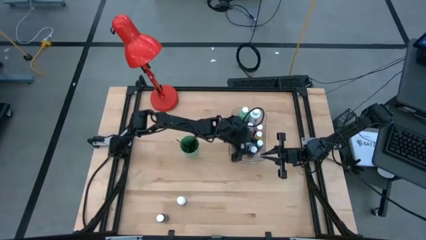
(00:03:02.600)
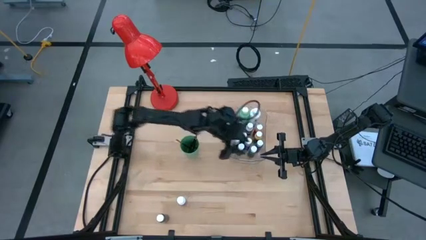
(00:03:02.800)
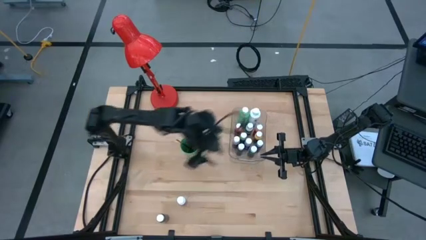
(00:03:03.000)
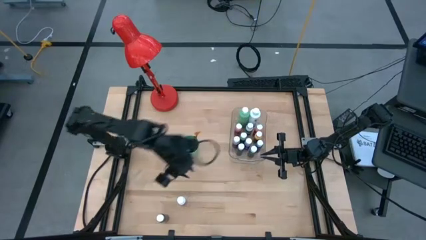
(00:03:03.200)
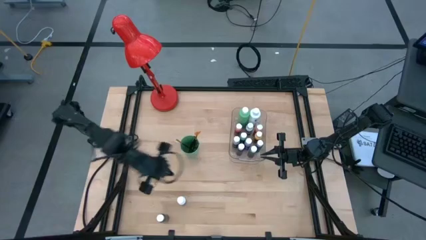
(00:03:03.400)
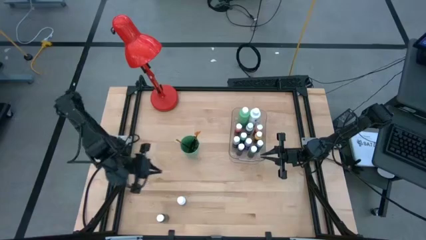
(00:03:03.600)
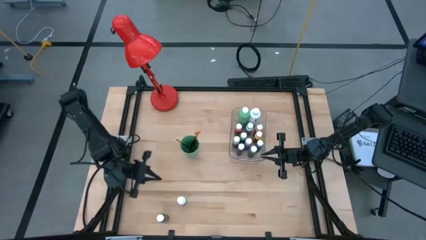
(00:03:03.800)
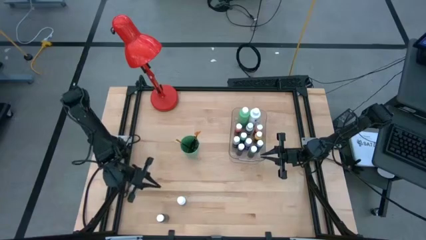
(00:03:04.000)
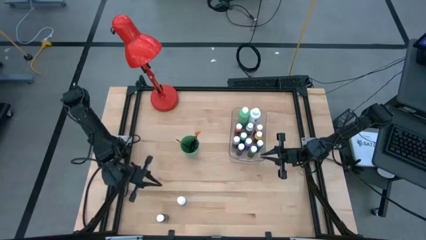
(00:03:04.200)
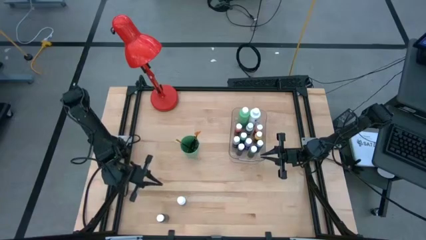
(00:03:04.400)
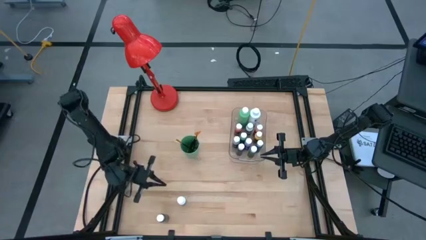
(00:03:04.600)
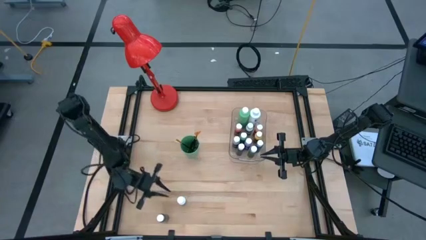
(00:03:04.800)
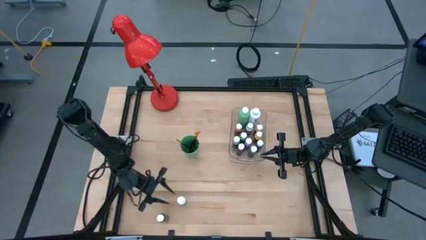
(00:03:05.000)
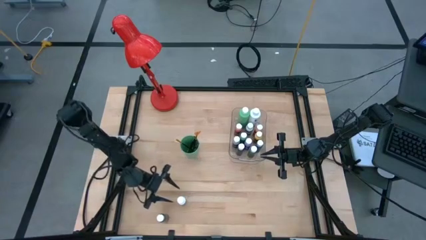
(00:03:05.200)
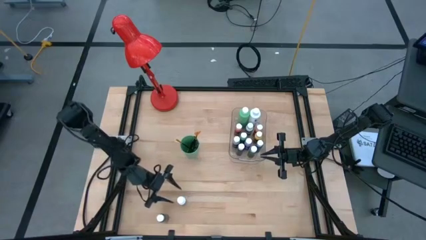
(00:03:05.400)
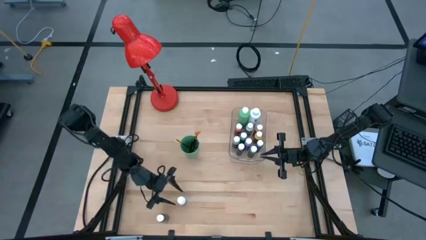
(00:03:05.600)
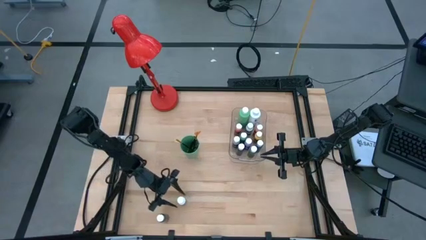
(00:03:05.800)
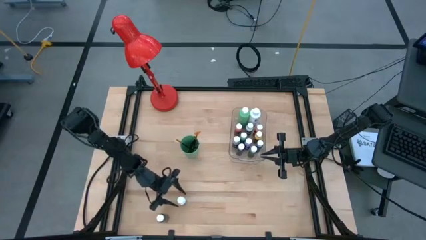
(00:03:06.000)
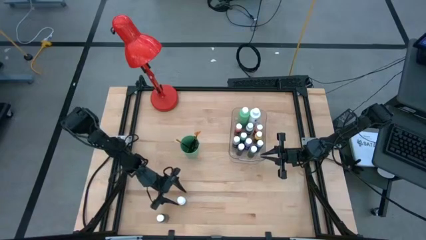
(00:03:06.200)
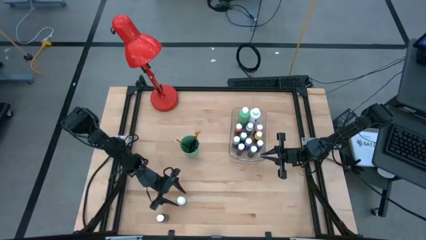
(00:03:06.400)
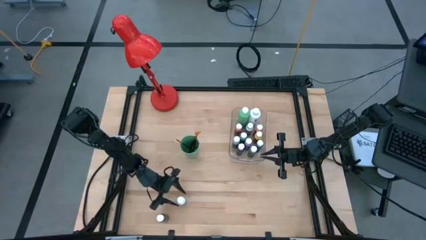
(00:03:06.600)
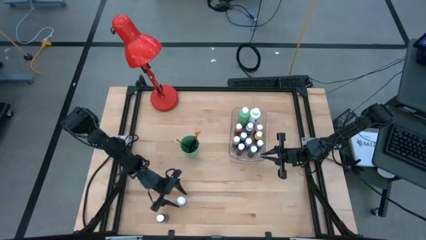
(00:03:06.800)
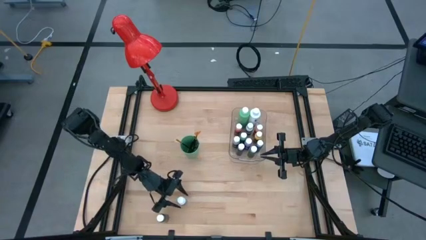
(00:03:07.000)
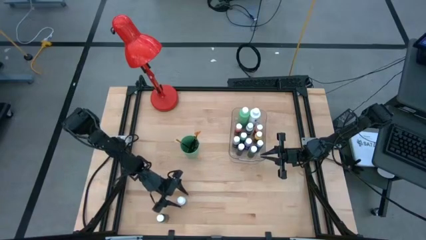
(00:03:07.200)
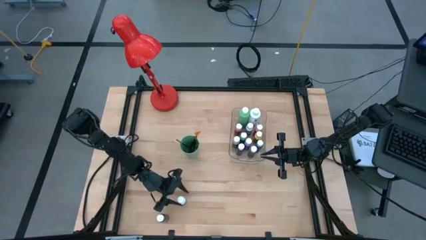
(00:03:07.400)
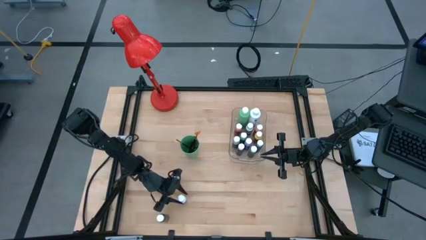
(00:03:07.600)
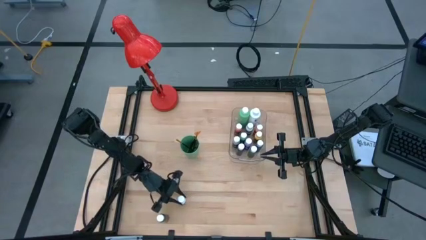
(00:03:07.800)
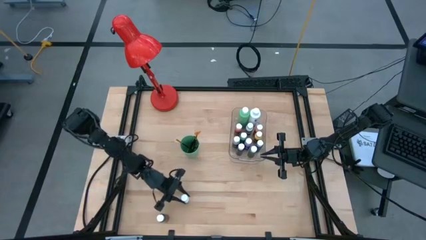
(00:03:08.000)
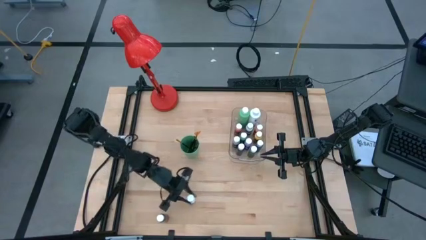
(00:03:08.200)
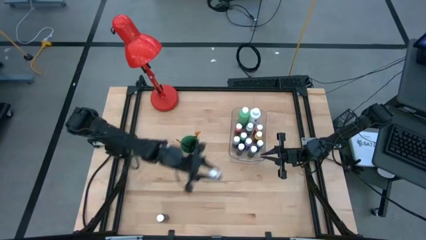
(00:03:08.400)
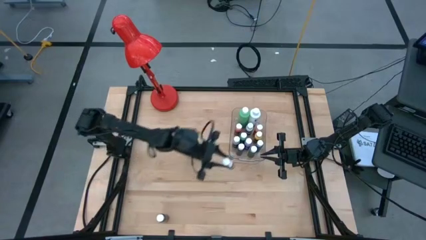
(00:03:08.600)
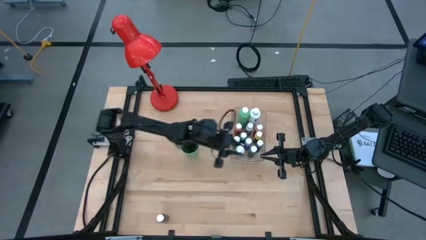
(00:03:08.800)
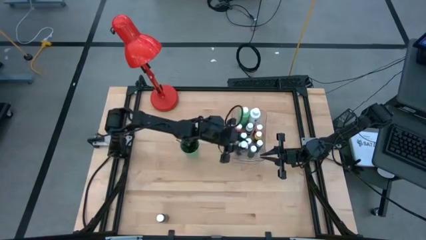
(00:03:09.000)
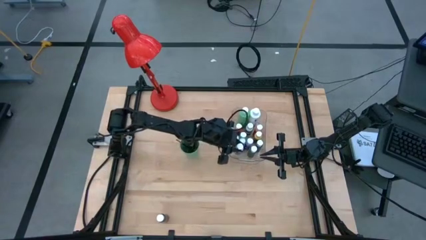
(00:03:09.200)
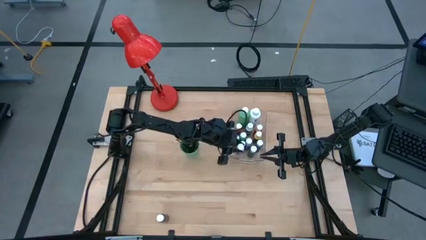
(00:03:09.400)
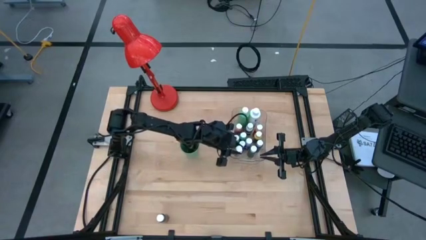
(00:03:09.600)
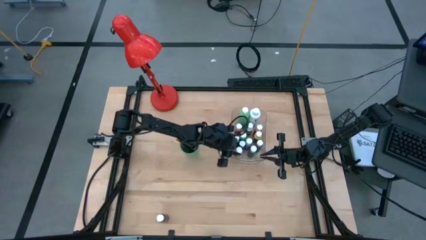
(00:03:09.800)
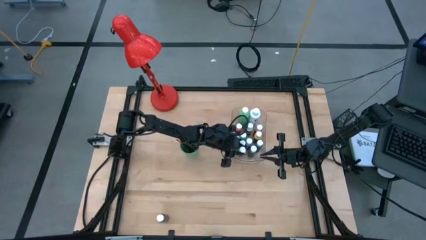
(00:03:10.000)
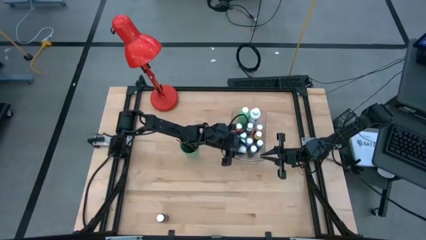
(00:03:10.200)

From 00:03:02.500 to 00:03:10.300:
Task: Pick & Place Paint Supplies
Put the small white paint bottle into the transparent bin

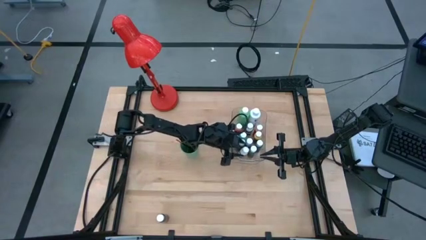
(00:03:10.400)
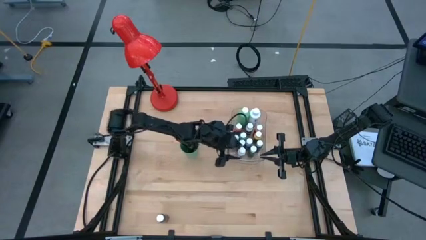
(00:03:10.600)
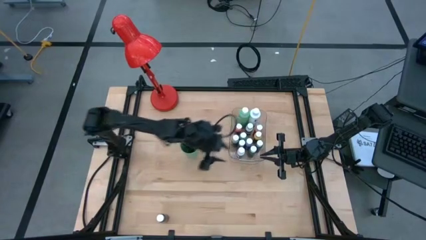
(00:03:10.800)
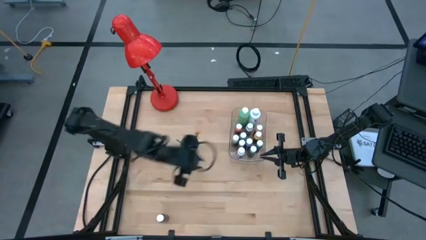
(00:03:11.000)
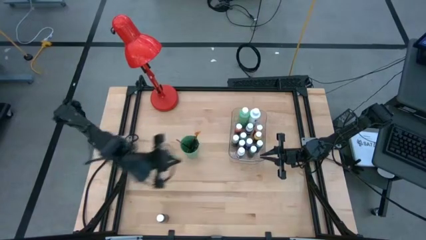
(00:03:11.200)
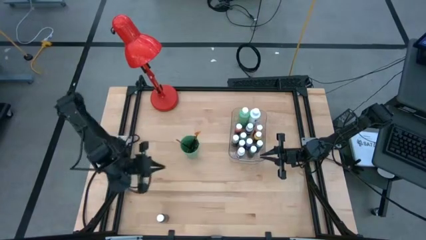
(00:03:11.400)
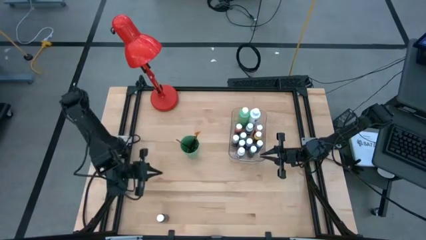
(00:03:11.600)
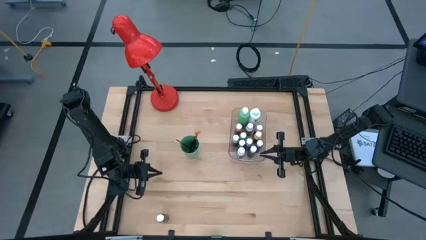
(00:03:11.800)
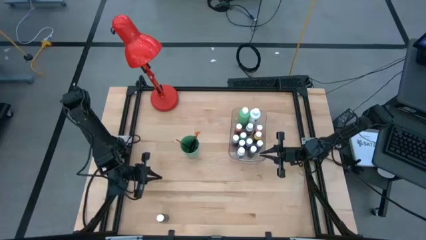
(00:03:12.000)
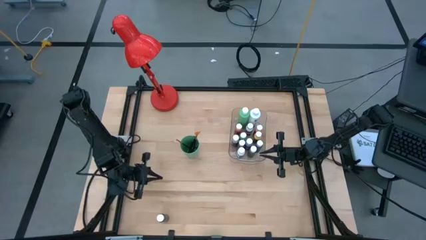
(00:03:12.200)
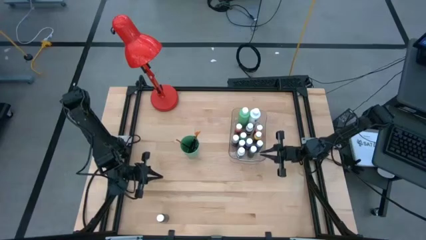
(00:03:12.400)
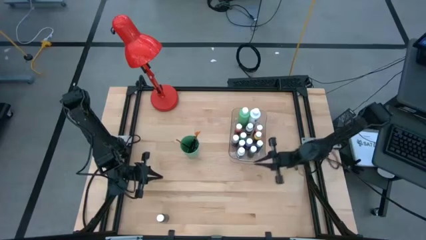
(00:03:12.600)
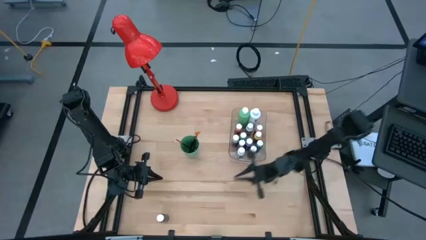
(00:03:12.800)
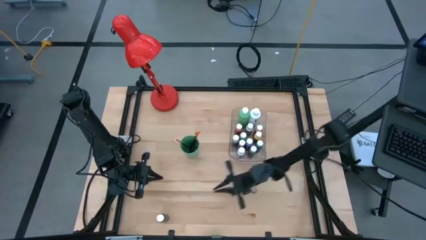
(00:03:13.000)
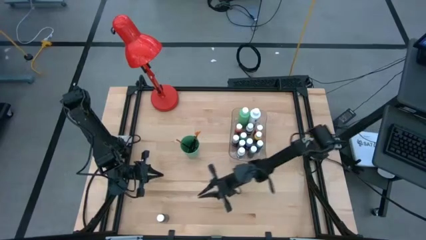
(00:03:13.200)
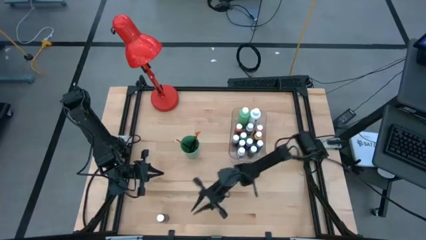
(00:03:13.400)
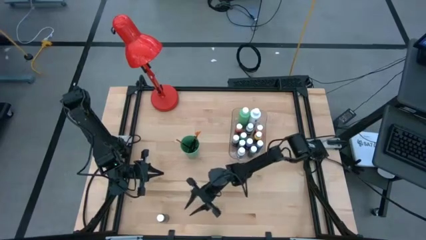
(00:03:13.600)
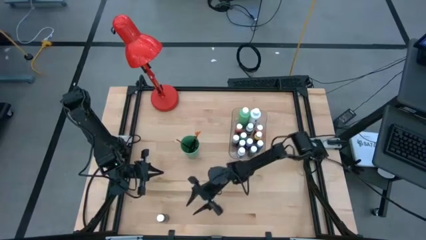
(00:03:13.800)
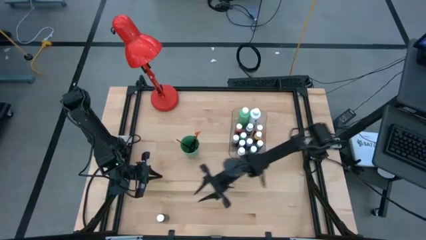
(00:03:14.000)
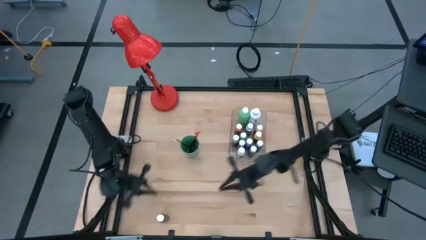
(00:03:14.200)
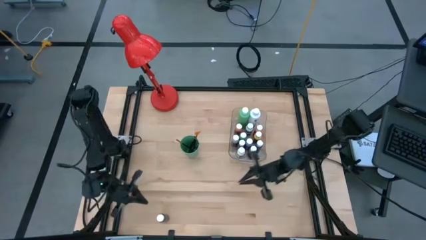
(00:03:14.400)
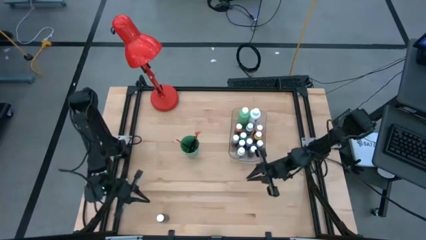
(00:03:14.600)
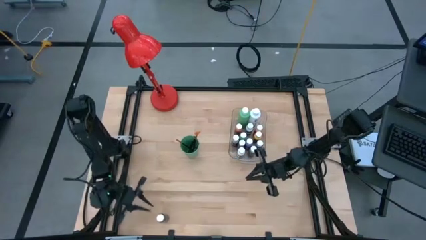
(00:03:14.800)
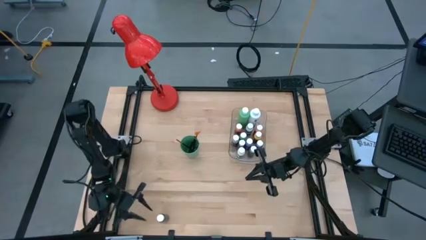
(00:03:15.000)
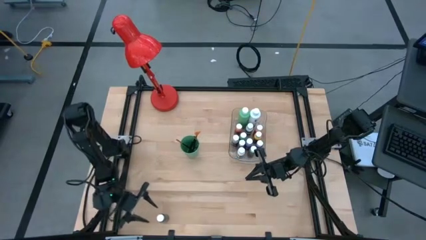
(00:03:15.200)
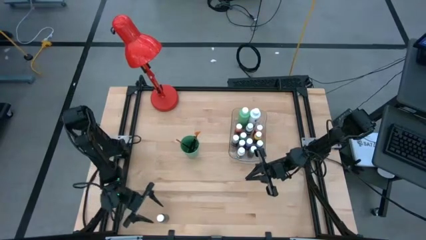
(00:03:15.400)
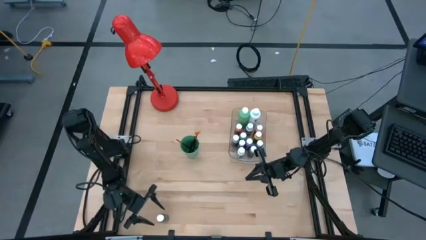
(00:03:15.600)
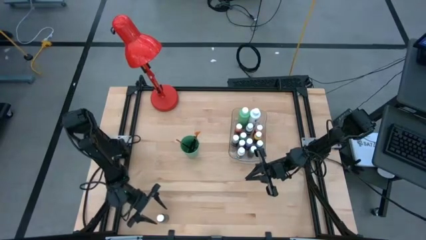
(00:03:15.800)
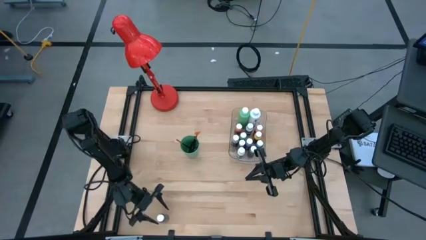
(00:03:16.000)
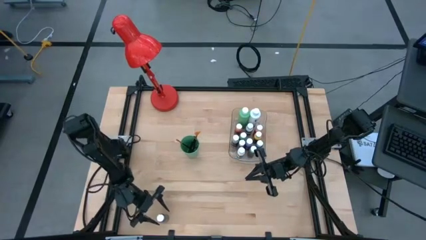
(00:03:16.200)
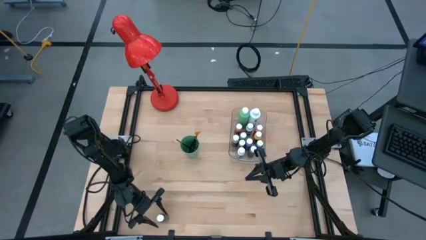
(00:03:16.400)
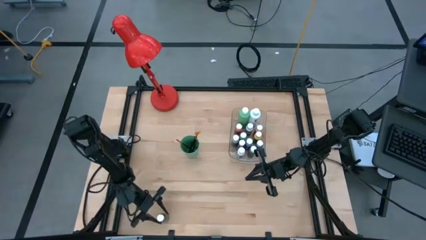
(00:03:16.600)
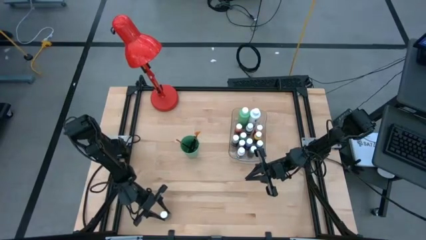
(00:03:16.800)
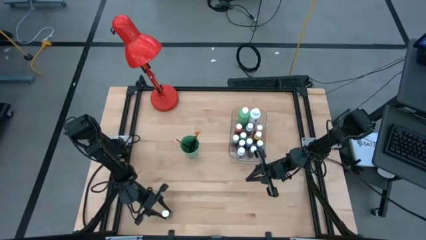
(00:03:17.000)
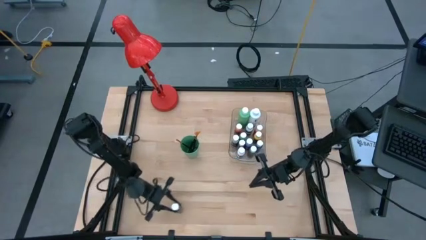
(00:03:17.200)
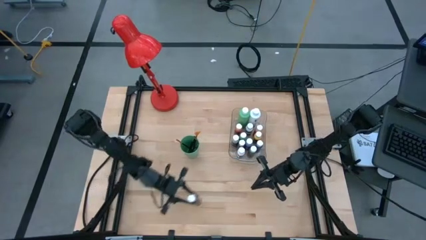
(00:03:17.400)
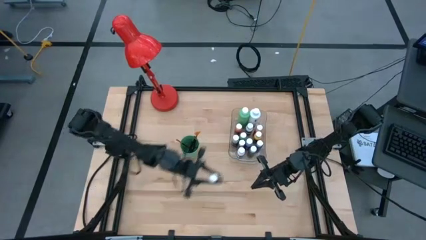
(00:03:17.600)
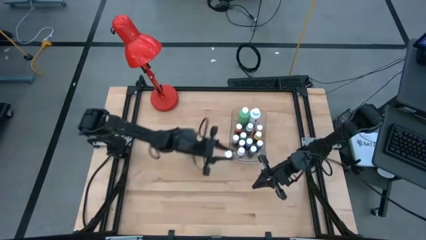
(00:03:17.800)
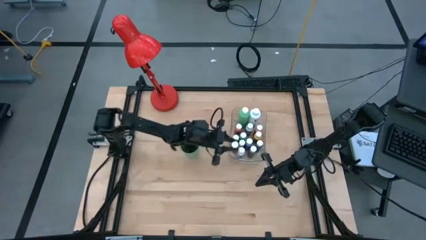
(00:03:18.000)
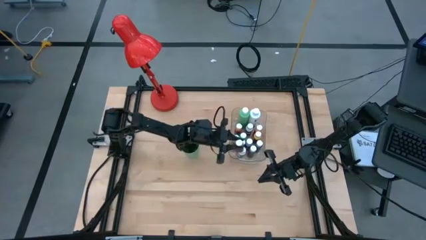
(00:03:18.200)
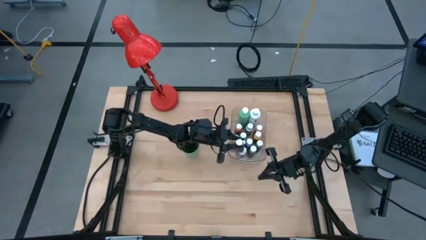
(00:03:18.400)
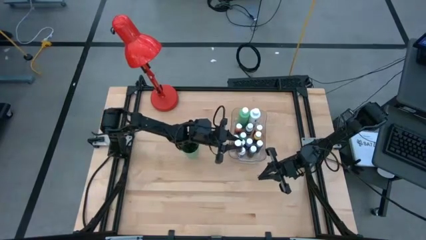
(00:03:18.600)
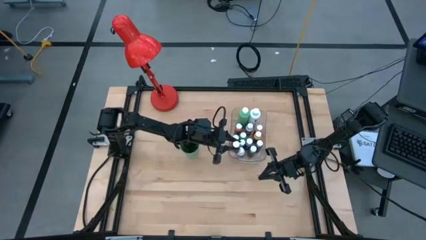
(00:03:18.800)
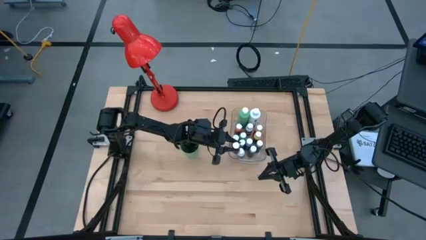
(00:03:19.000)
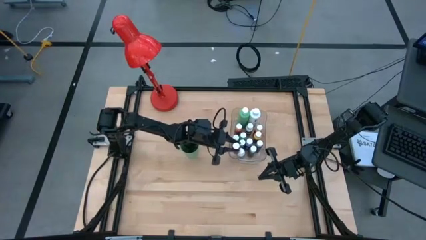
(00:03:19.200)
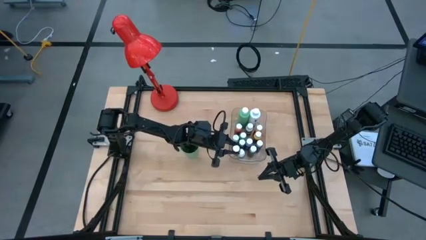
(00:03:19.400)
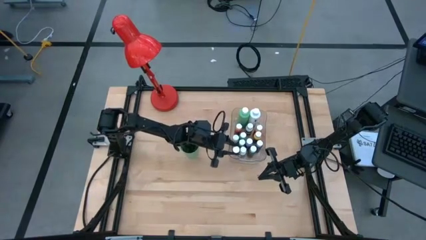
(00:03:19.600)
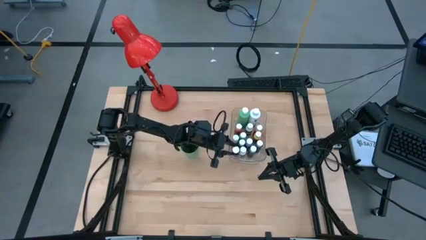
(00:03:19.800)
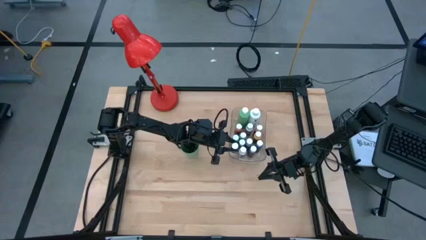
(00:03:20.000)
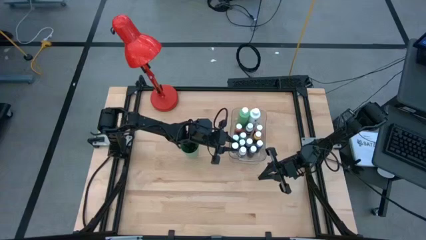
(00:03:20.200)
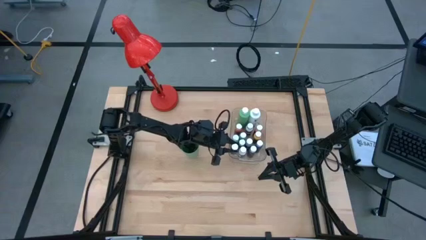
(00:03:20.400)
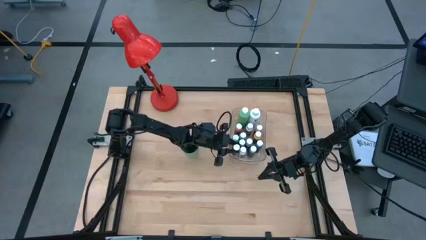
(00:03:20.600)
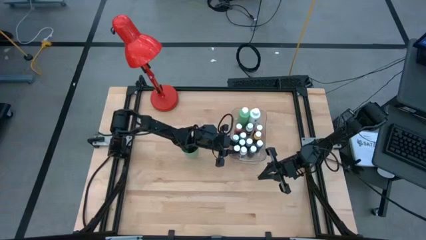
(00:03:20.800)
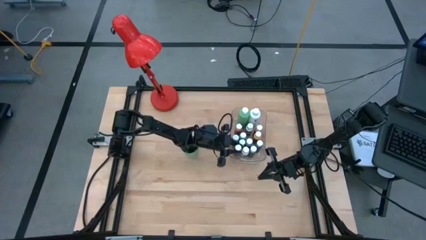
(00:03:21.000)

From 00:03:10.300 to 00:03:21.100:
Put the small brown paint bottle into the transparent bin
